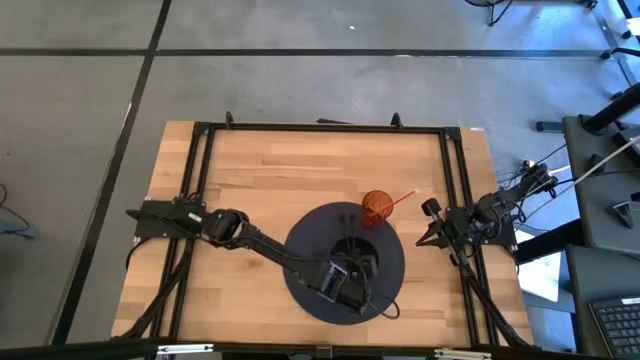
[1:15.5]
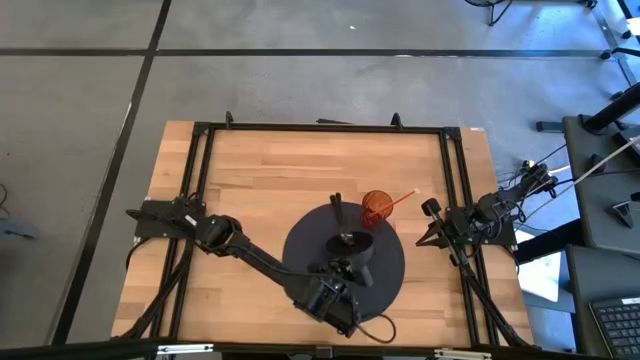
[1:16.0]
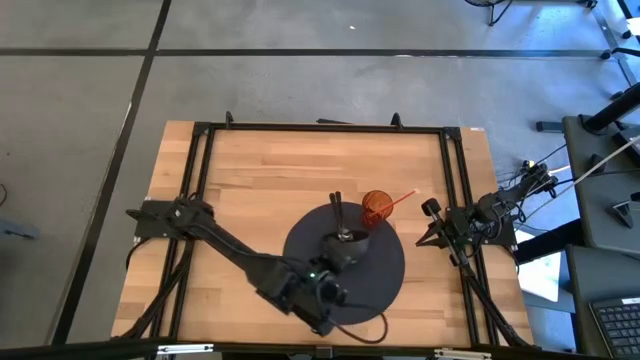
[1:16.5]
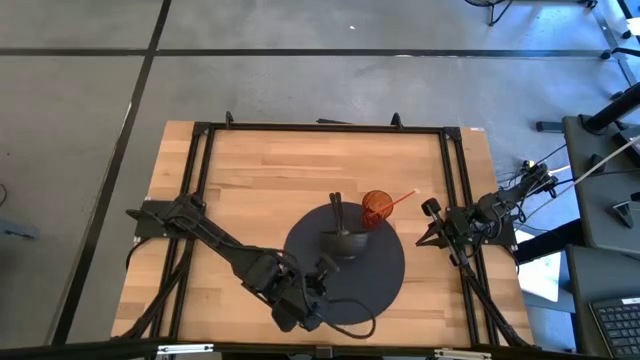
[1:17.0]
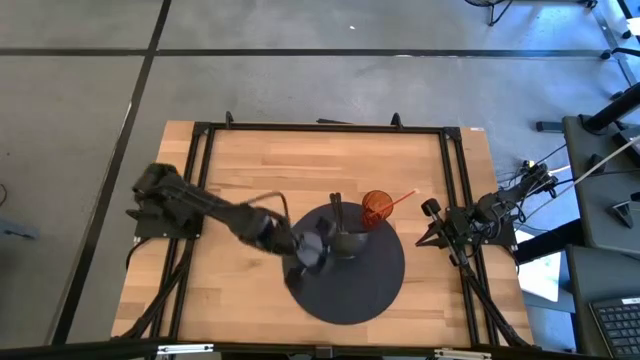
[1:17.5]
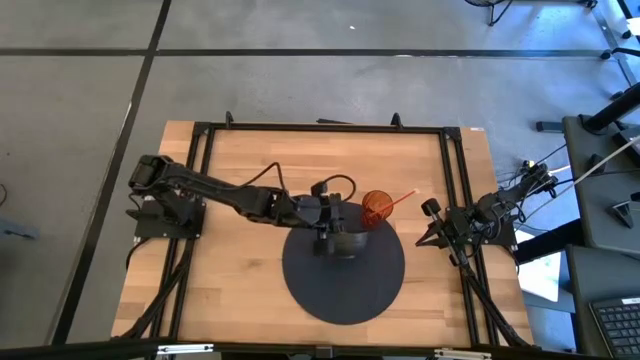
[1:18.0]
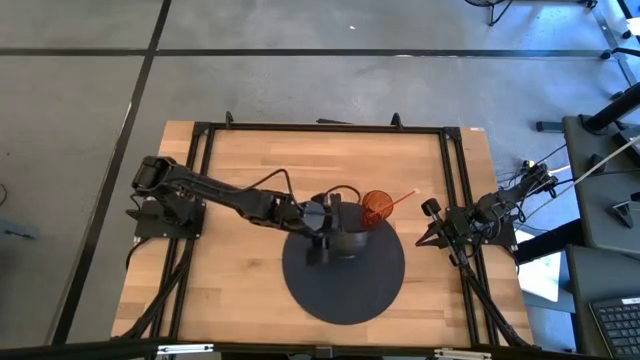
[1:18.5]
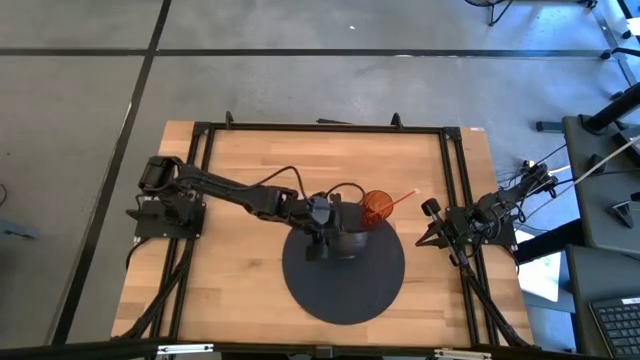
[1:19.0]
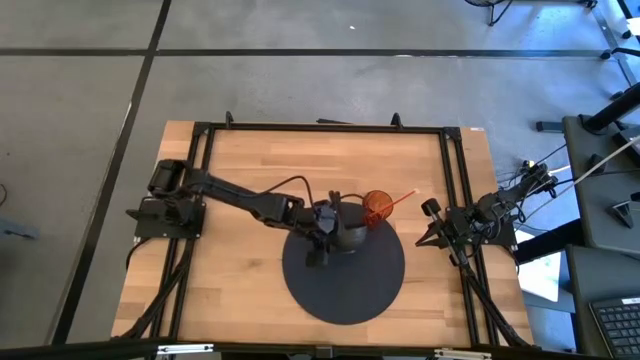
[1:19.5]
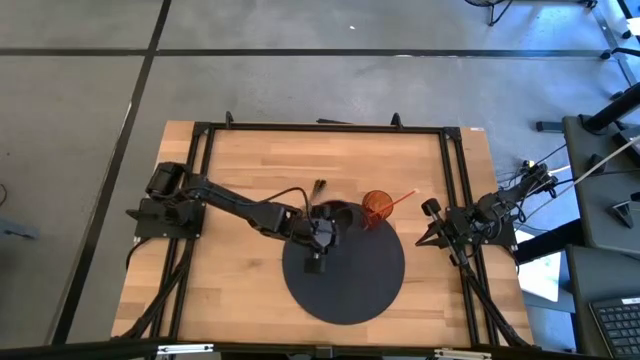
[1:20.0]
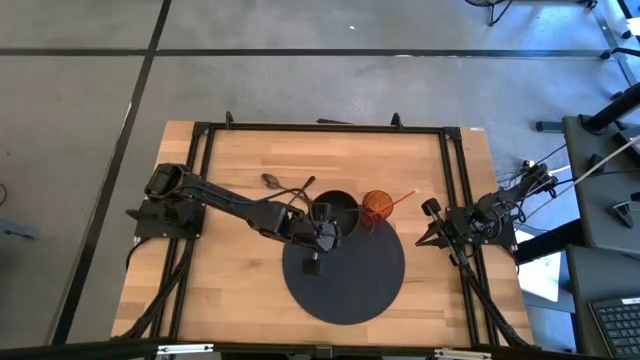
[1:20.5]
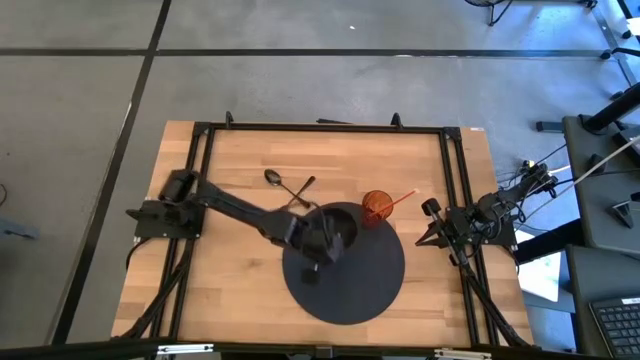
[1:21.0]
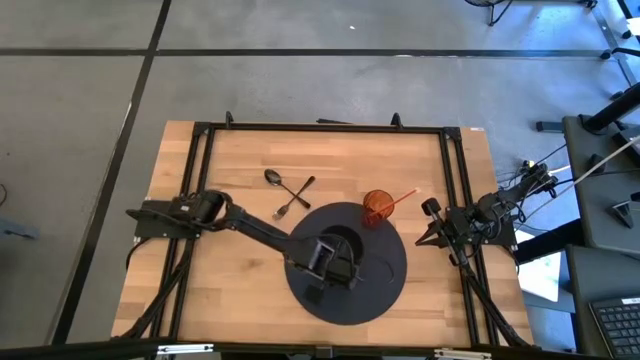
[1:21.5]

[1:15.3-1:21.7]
Task: Pick & Place Utensil
Adjust the black bowl on the black mat

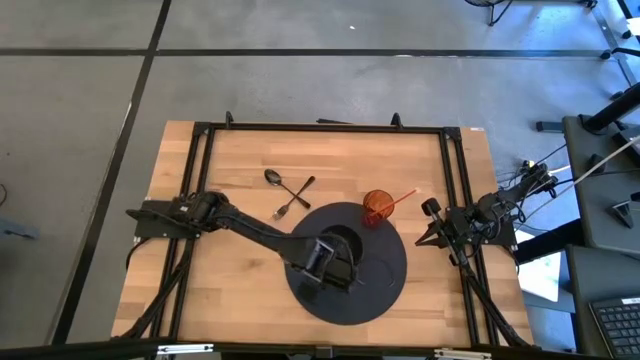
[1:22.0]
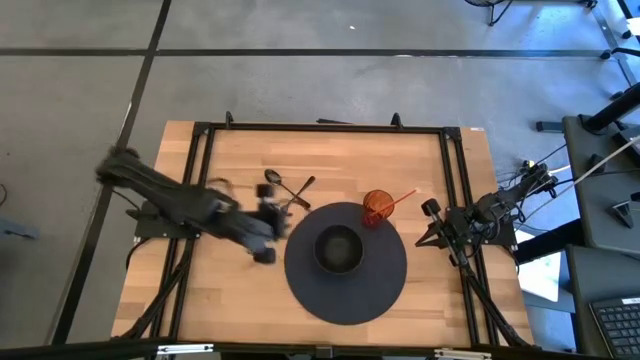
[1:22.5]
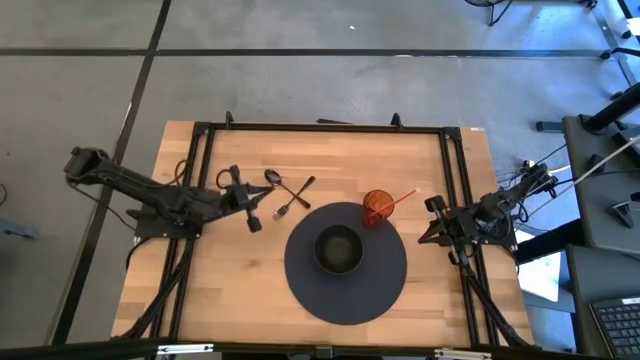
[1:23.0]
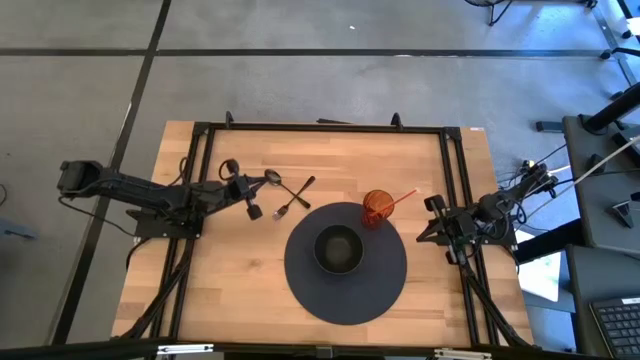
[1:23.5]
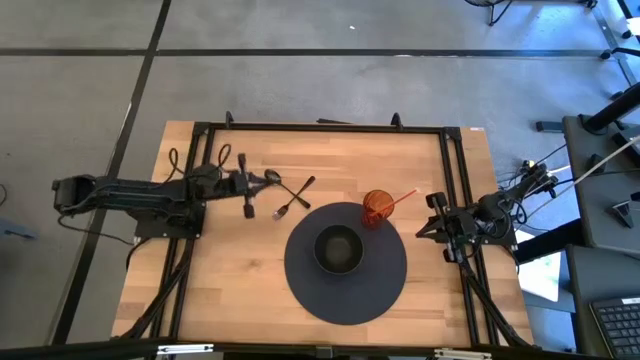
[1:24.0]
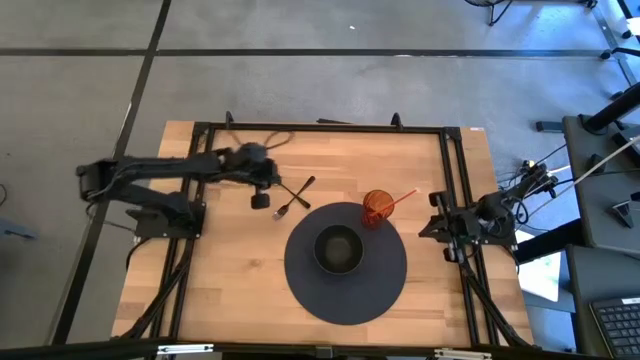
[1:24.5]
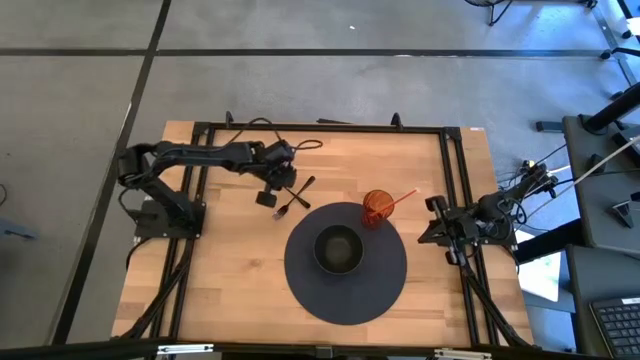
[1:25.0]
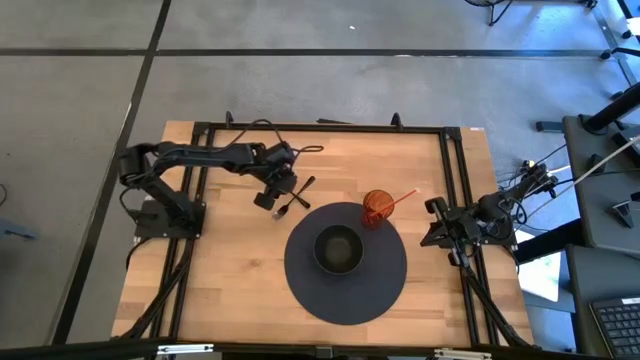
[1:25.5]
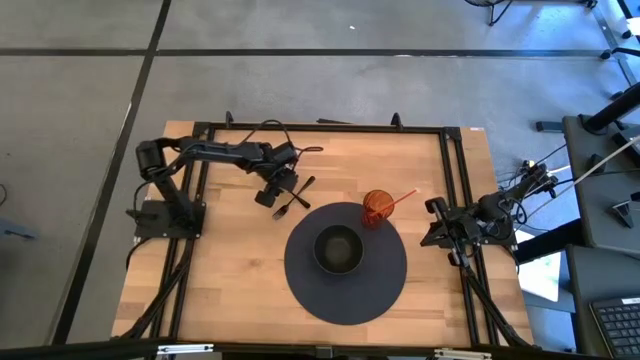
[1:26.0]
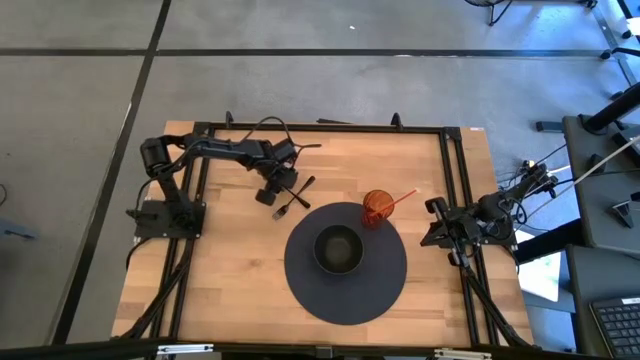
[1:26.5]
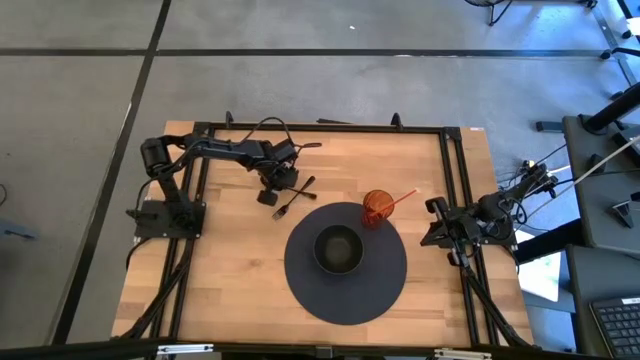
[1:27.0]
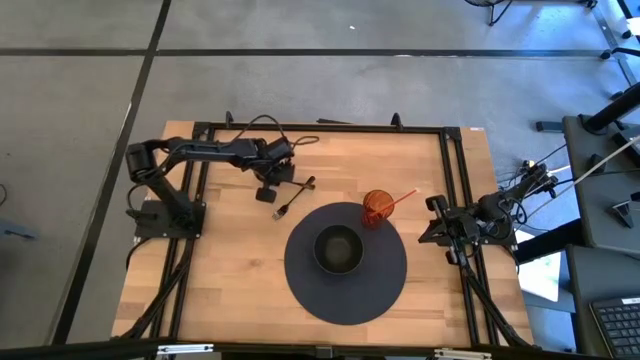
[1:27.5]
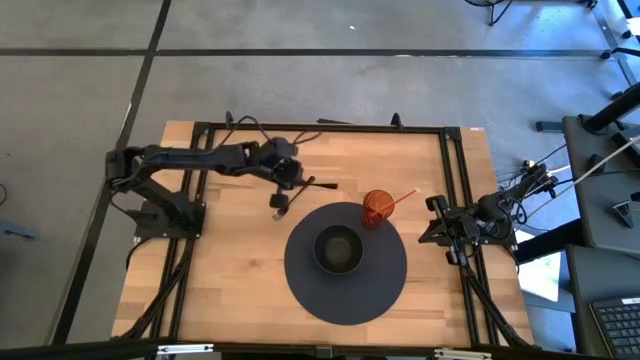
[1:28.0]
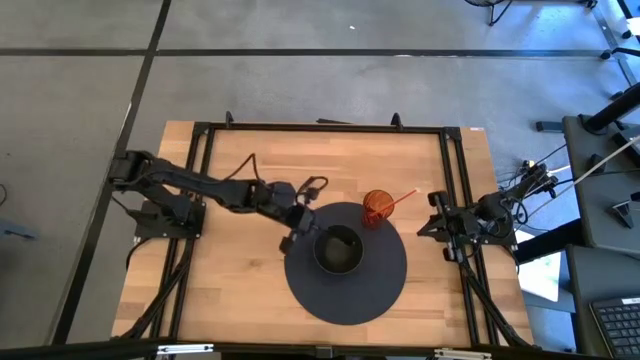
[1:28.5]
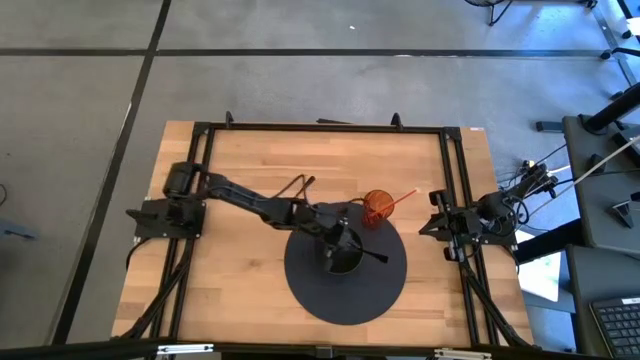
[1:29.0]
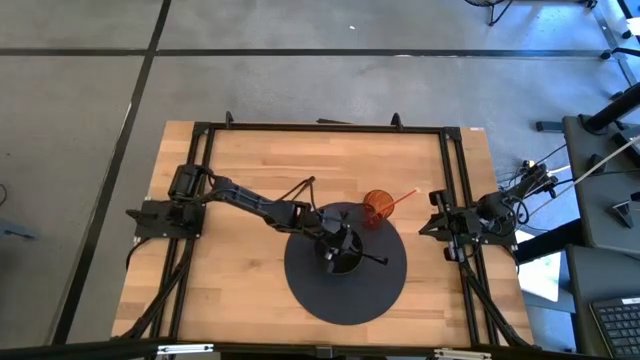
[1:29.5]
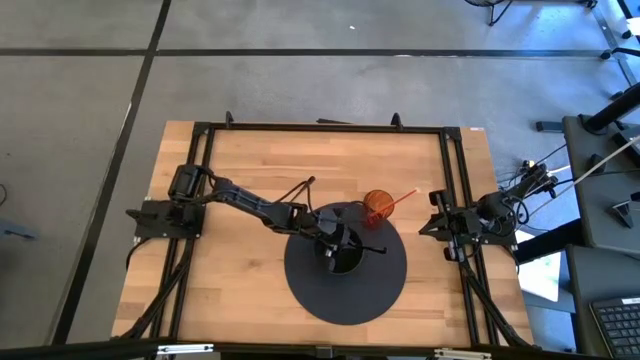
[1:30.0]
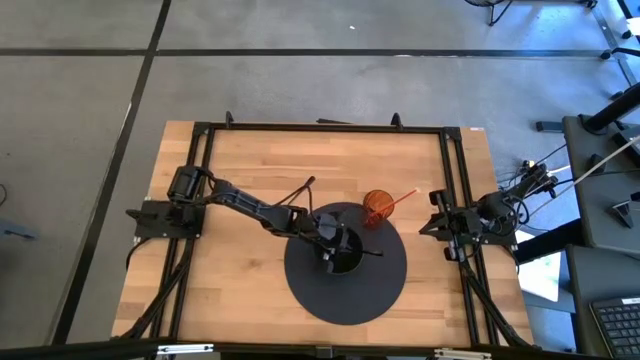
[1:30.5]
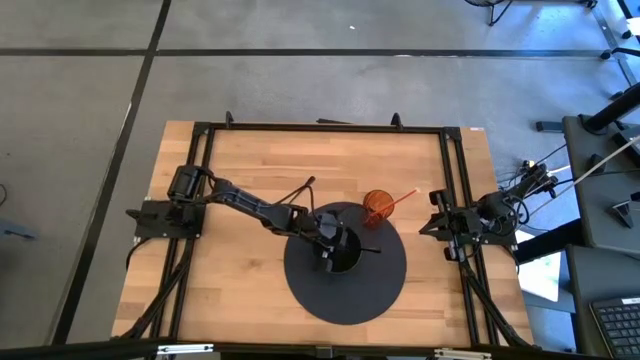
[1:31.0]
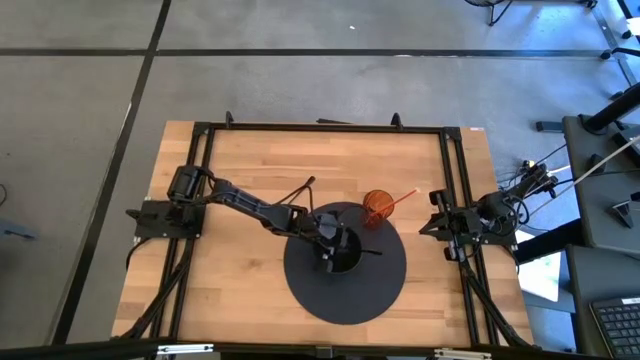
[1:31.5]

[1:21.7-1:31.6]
Put the black spoon into the black bowl

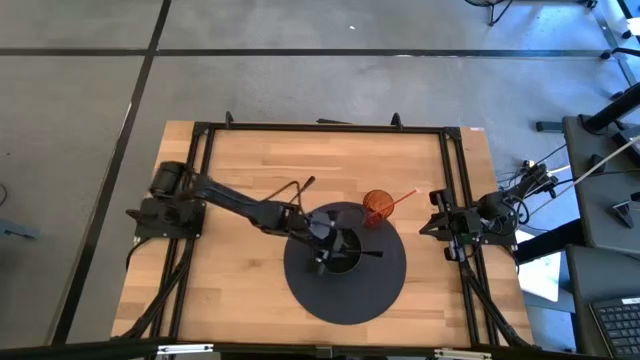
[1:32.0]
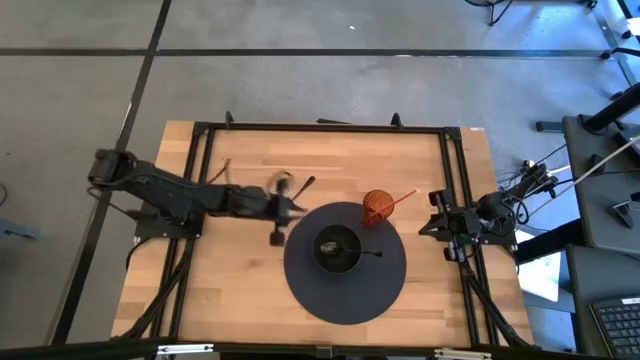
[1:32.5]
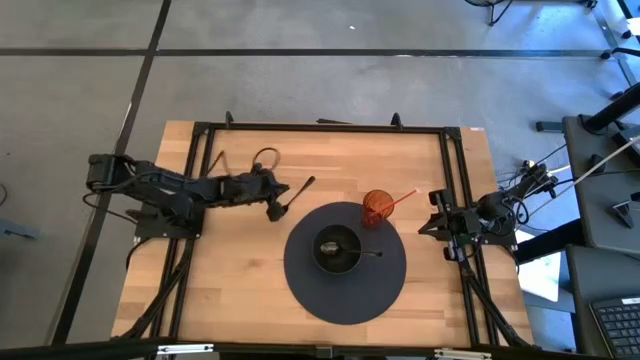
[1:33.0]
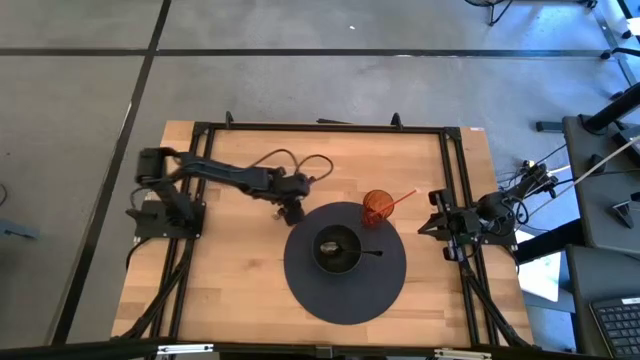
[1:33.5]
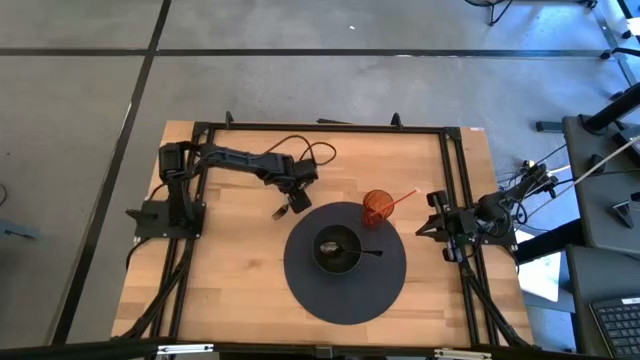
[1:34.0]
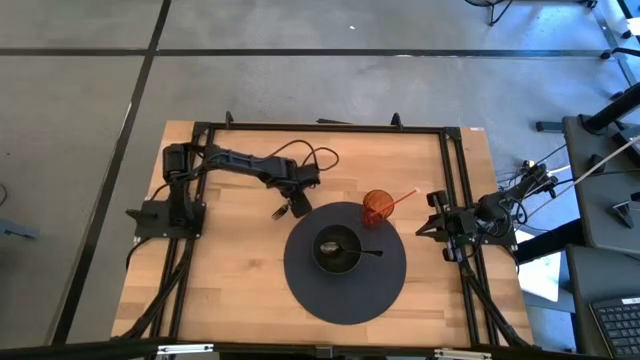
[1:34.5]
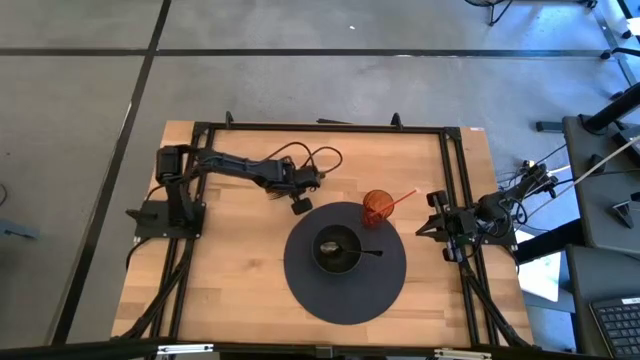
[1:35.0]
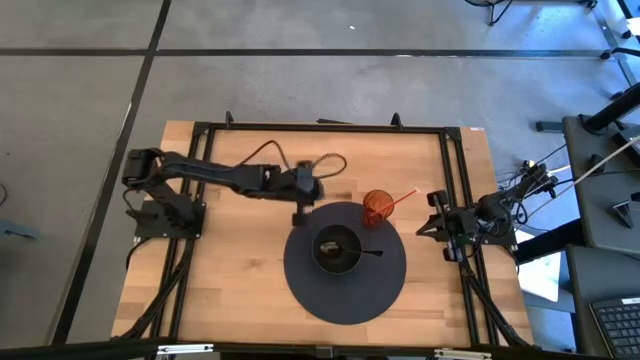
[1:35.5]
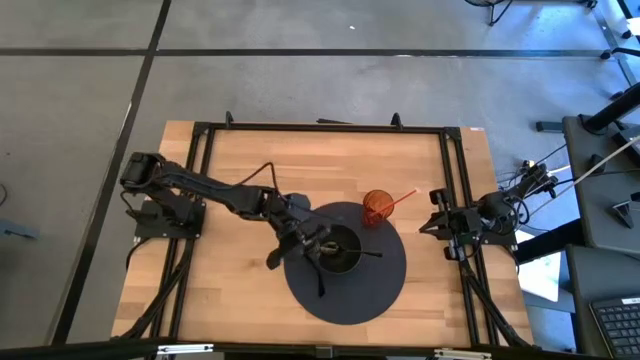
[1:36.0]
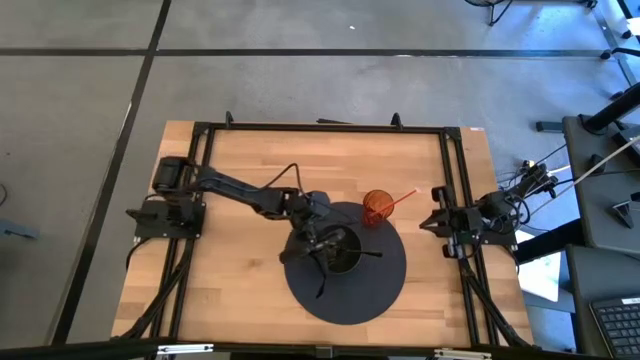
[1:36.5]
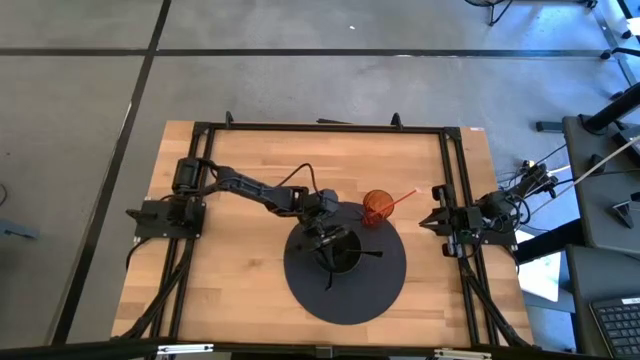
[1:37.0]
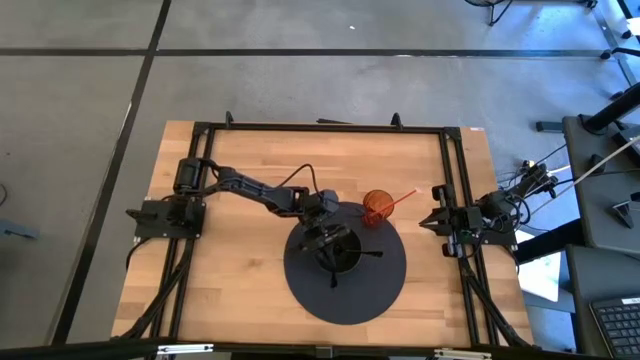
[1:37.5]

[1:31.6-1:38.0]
Put the black fork into the black bowl
